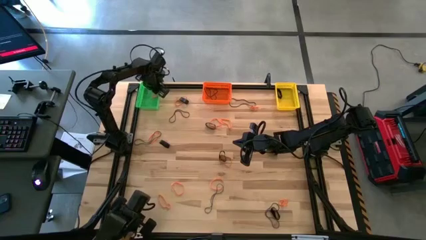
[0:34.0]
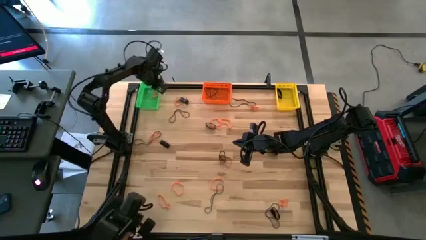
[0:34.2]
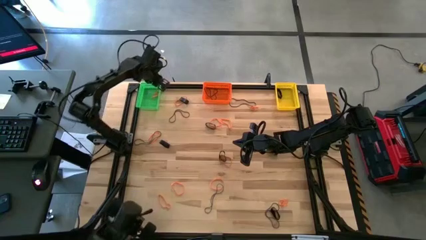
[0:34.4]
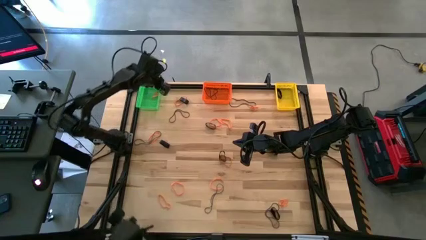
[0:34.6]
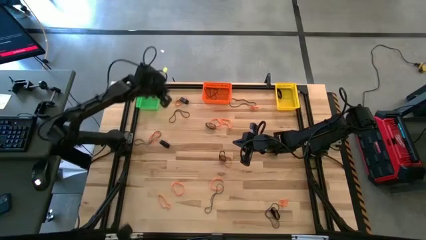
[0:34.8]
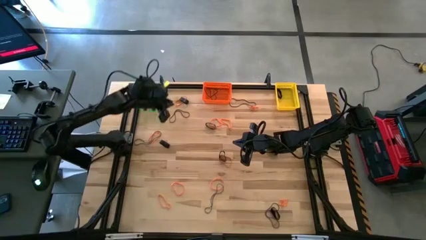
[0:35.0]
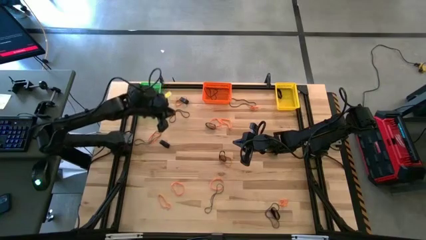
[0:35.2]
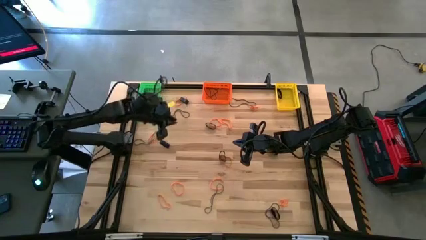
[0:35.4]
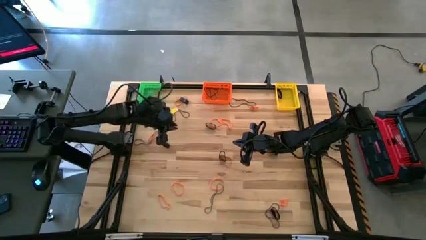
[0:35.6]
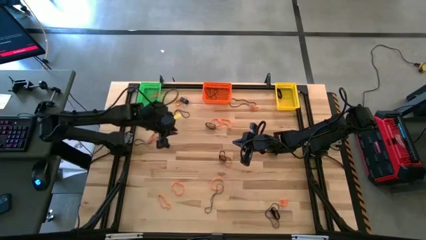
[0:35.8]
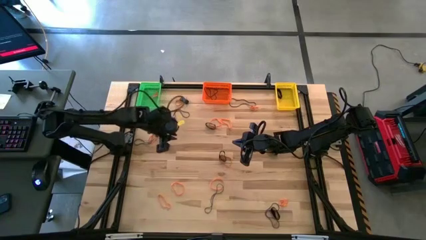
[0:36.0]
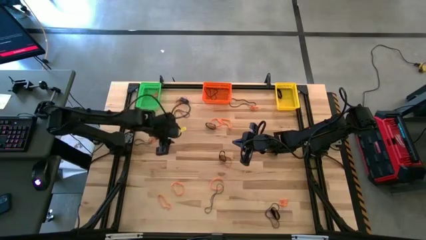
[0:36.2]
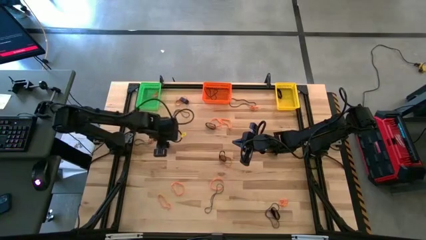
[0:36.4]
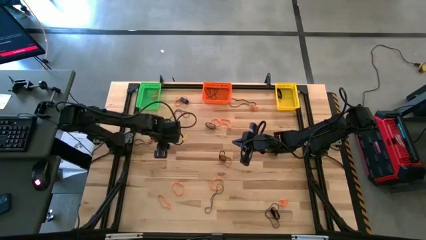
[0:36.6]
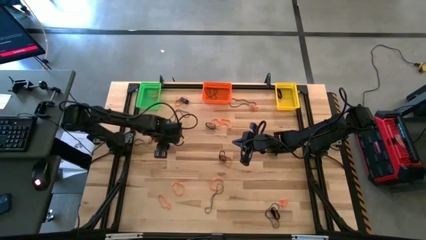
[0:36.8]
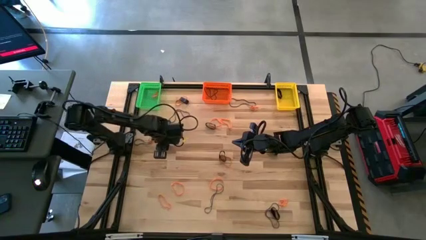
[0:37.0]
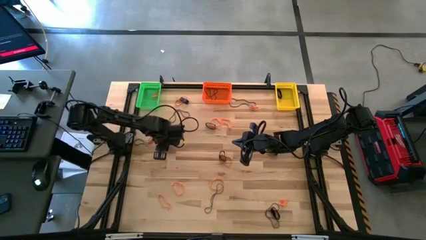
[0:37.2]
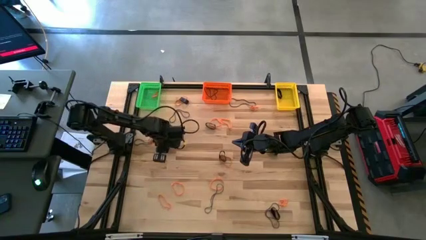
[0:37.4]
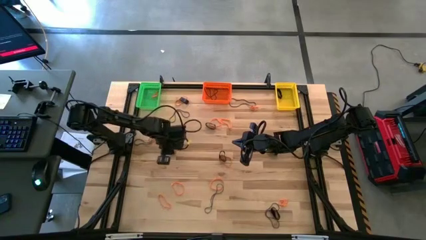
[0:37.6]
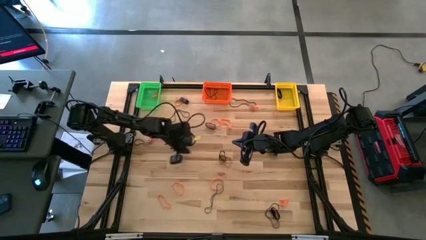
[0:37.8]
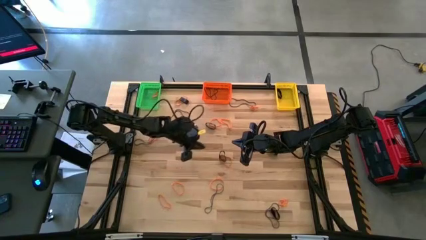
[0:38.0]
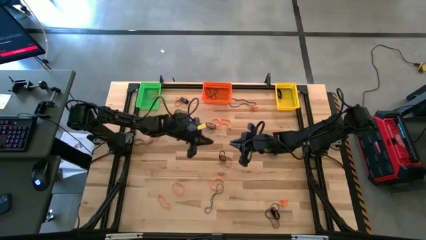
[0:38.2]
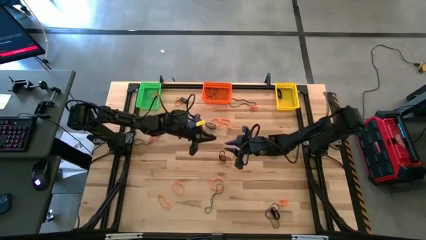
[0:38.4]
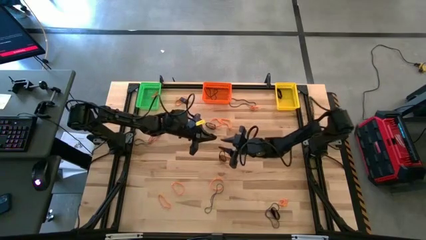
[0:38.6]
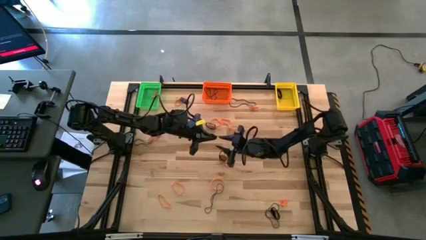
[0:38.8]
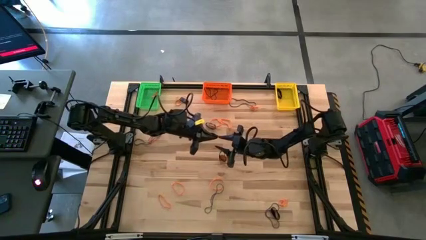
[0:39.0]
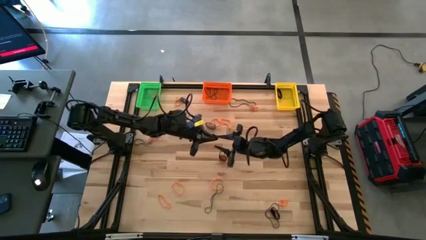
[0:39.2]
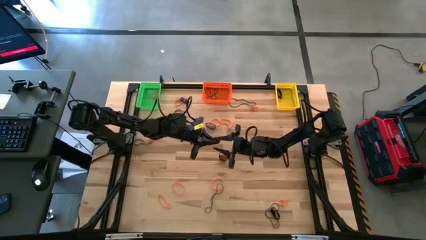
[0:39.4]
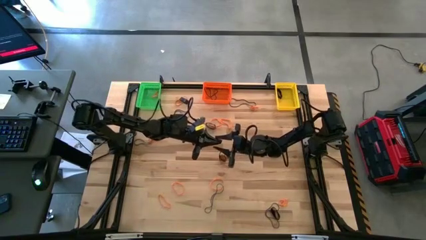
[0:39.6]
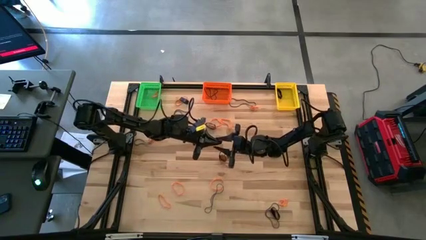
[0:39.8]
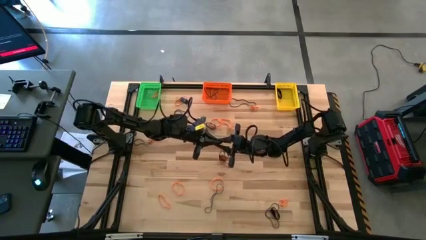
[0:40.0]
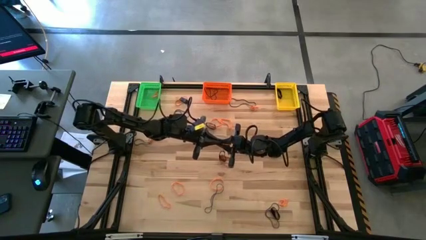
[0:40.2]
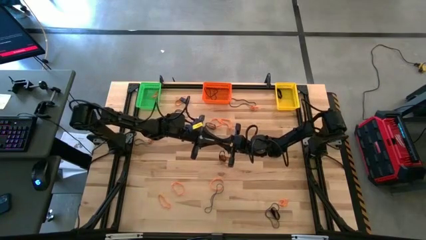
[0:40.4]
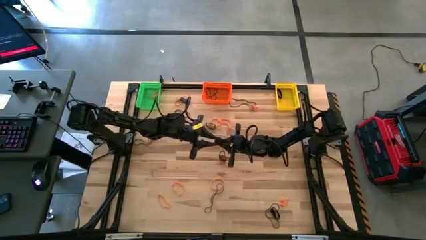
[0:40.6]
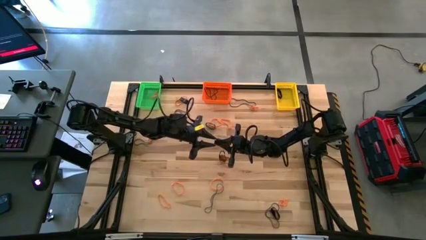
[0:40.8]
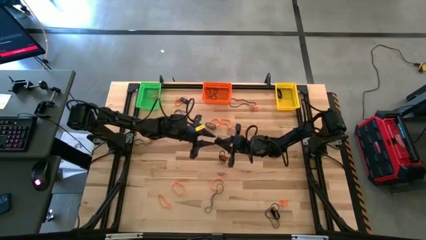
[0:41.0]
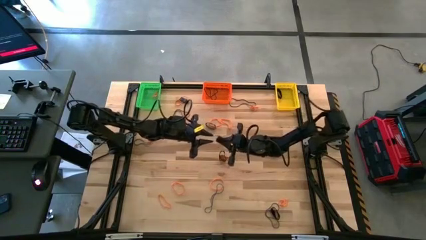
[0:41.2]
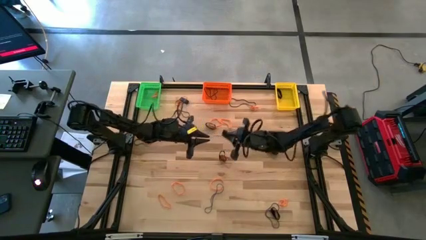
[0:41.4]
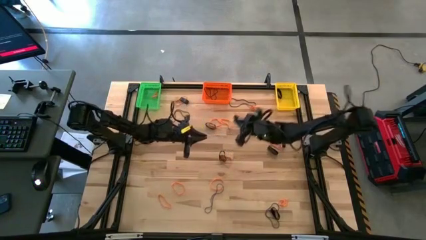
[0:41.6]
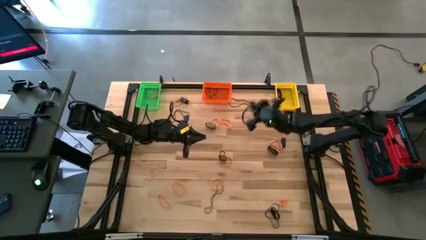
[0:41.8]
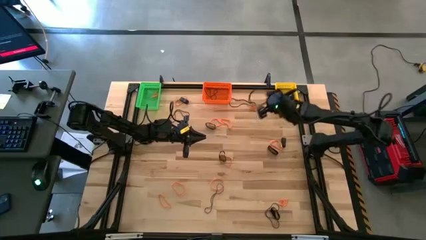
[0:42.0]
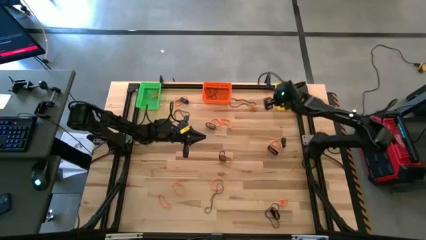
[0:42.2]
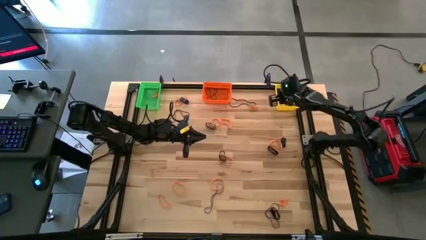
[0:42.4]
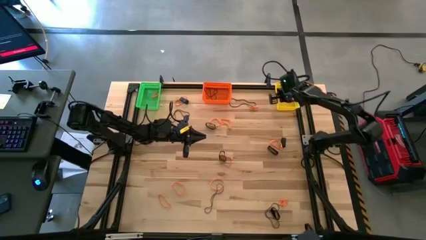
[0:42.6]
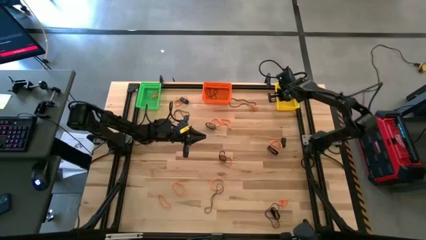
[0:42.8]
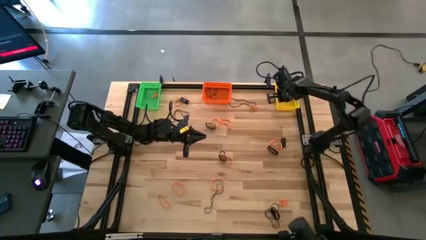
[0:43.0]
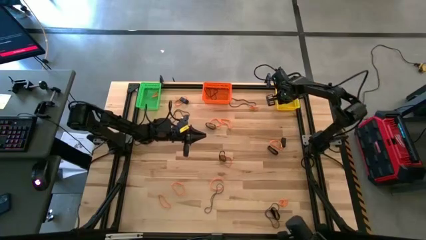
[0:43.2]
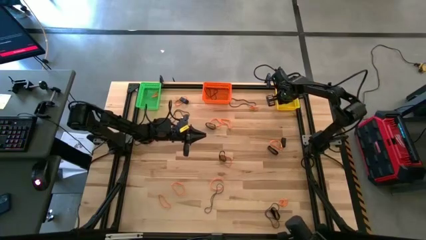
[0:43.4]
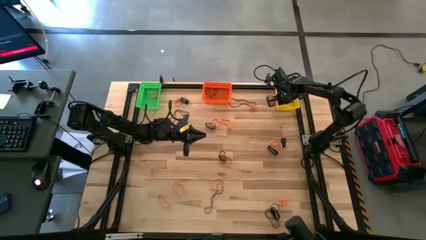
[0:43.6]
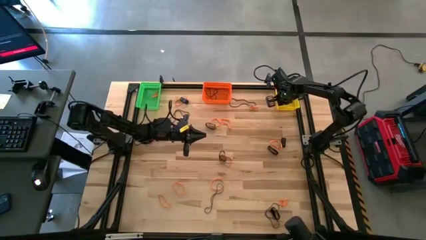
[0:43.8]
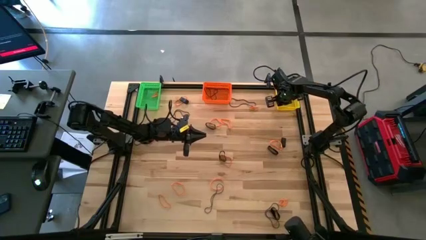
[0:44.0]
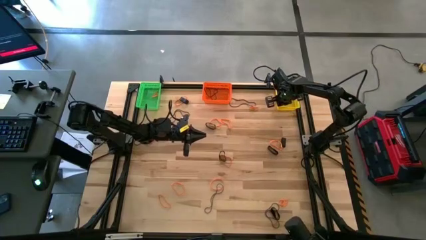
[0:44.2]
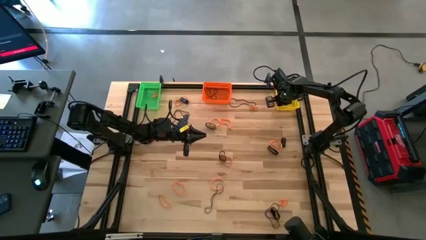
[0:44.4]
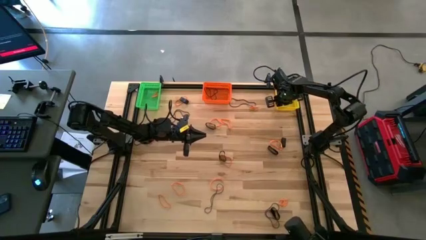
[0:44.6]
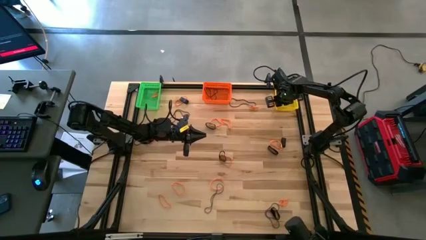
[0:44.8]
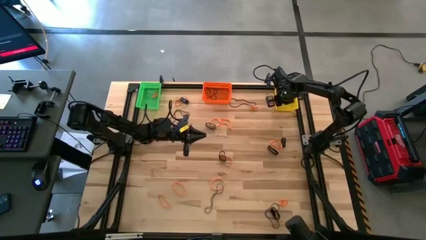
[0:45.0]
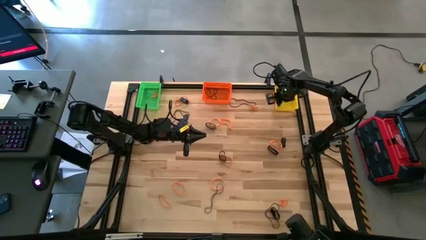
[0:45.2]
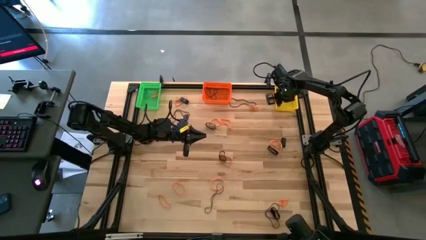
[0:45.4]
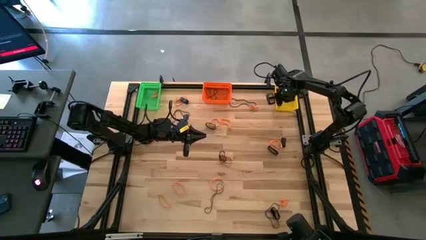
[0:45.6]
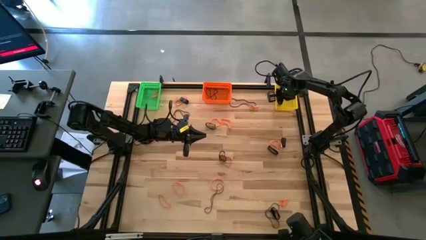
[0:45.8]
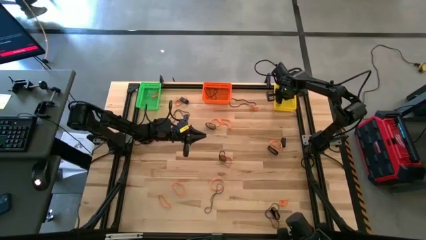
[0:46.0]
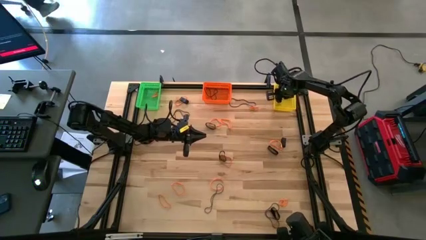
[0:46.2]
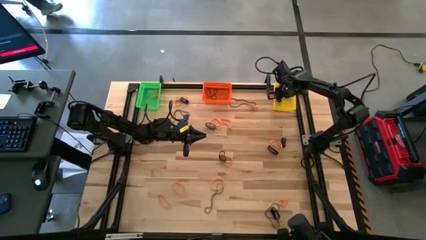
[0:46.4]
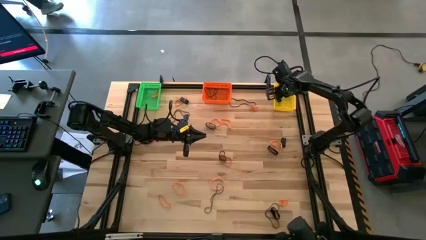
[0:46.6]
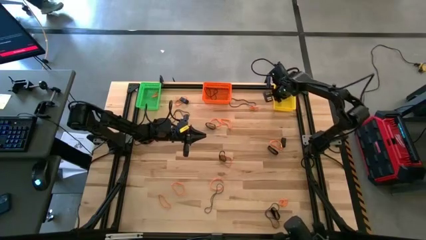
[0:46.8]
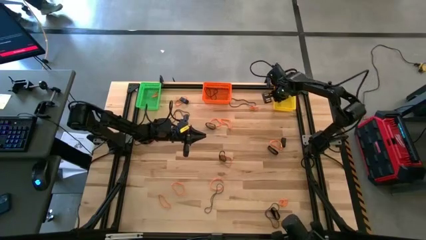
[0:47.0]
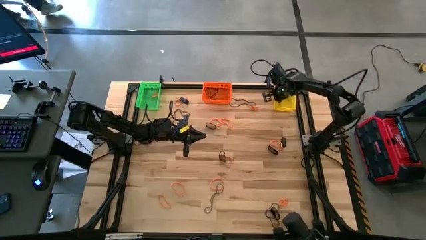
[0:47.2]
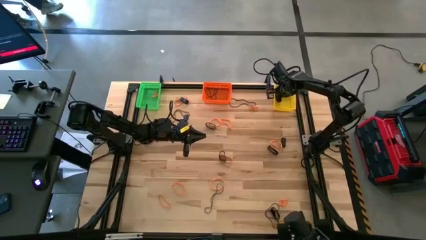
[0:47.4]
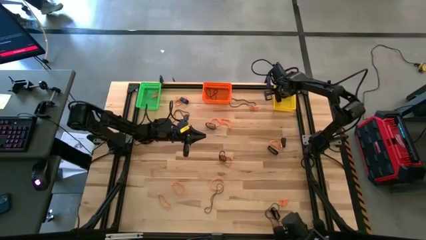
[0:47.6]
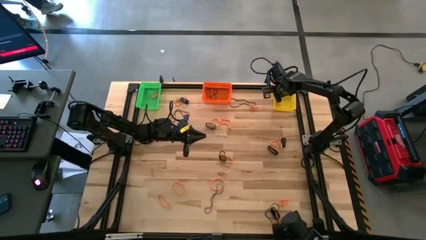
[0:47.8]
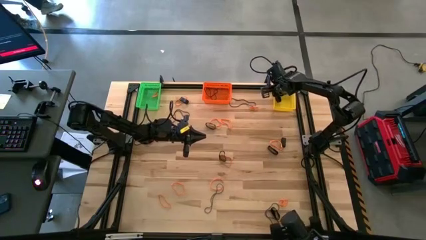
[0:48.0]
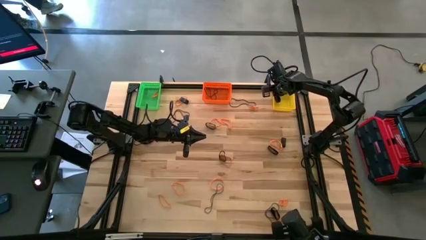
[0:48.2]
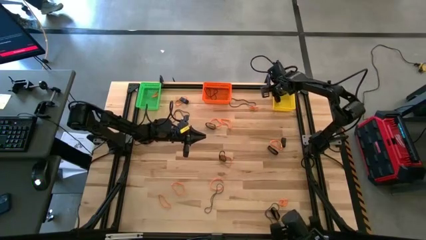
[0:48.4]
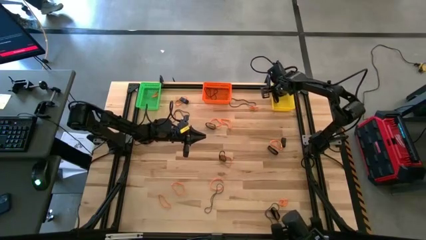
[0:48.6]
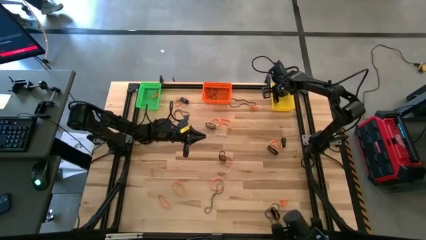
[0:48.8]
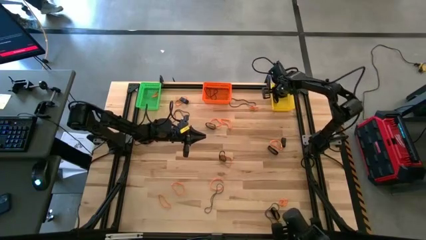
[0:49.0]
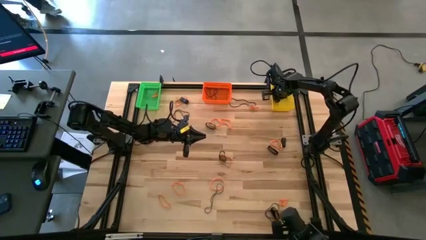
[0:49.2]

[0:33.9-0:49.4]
Task: Sort rubber bands into baskets
Put the middle left black rubber band into the yellow bin
